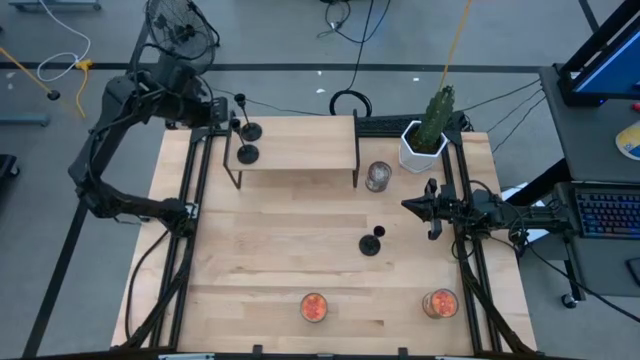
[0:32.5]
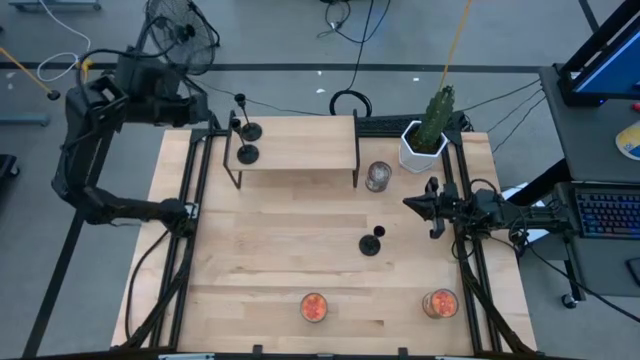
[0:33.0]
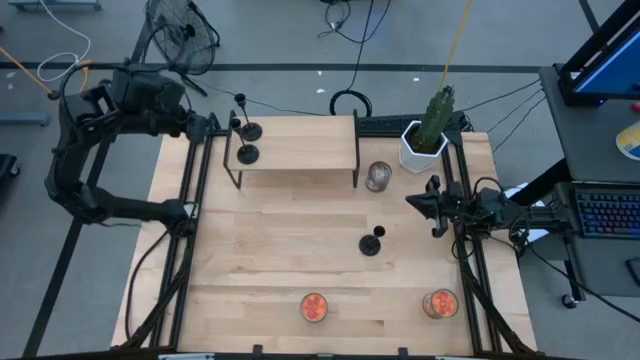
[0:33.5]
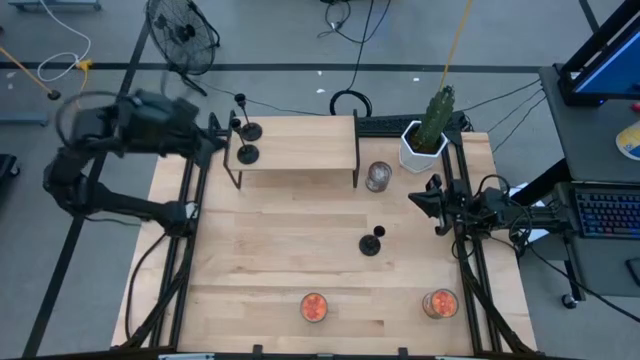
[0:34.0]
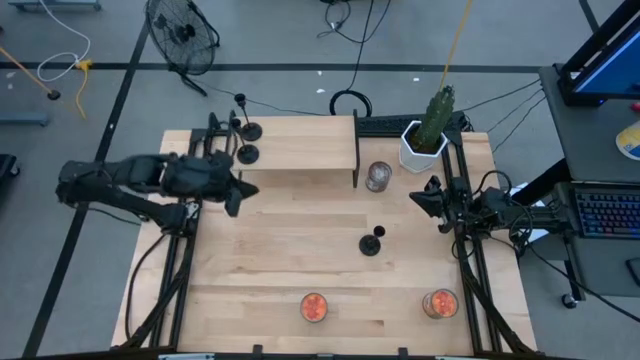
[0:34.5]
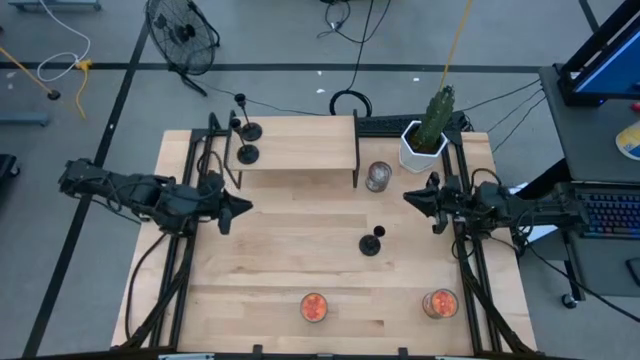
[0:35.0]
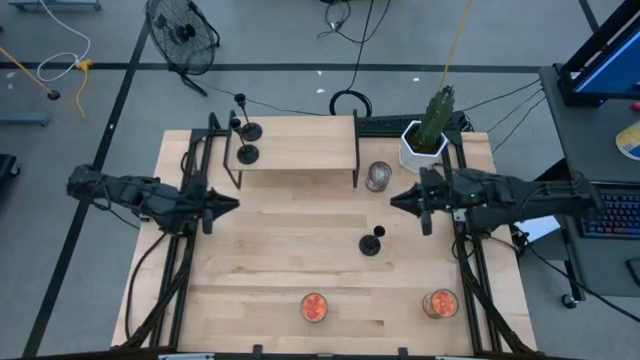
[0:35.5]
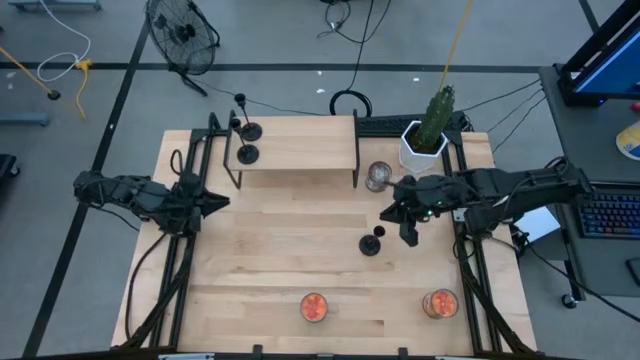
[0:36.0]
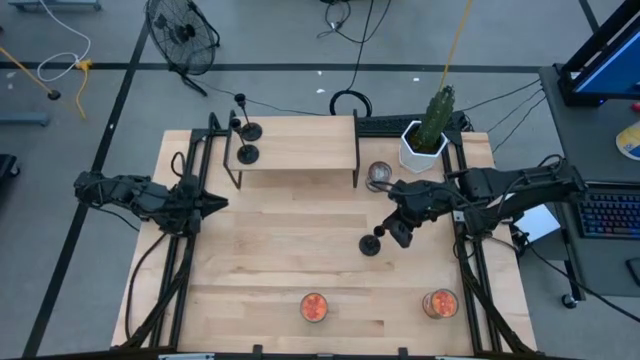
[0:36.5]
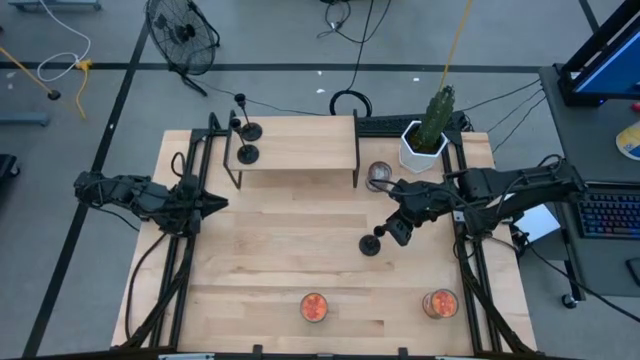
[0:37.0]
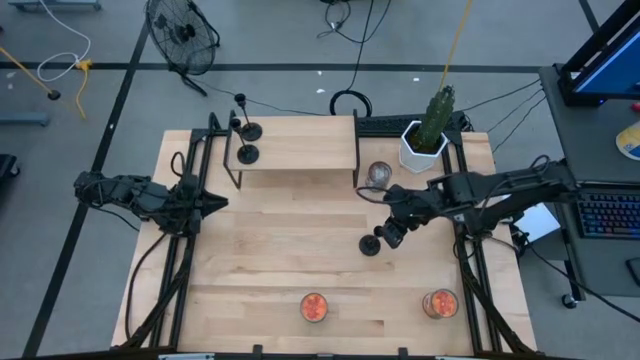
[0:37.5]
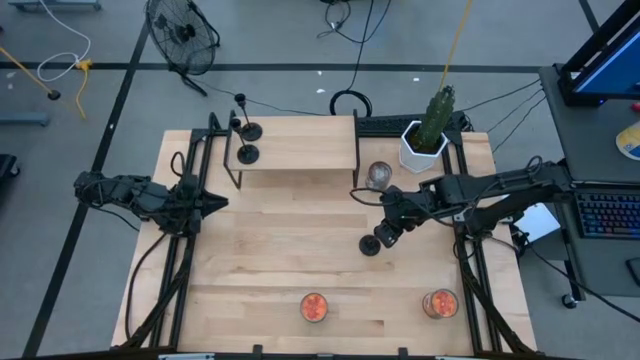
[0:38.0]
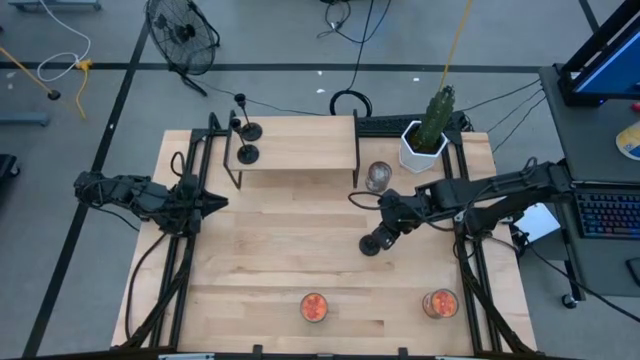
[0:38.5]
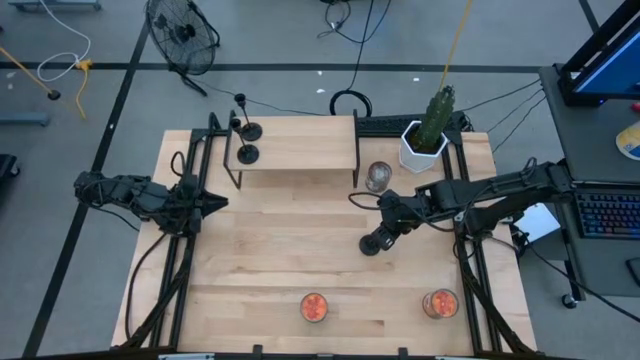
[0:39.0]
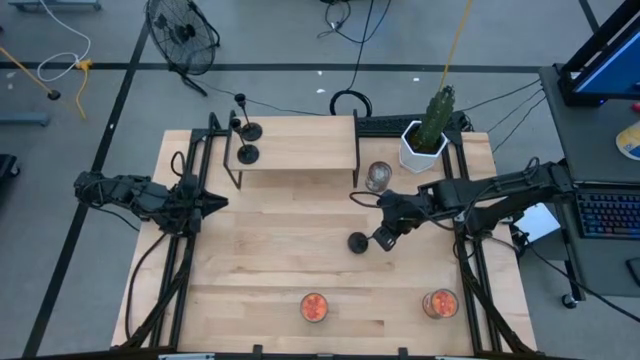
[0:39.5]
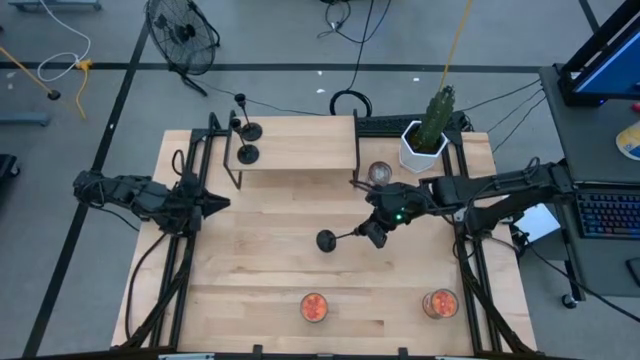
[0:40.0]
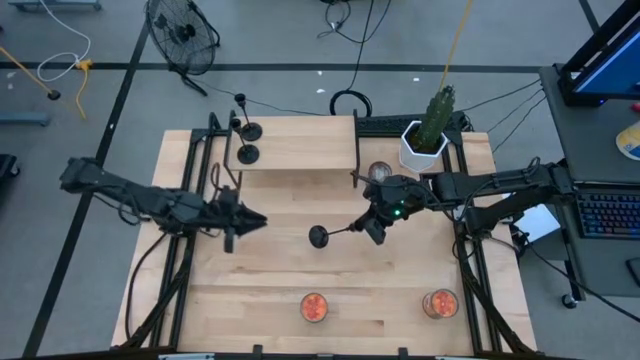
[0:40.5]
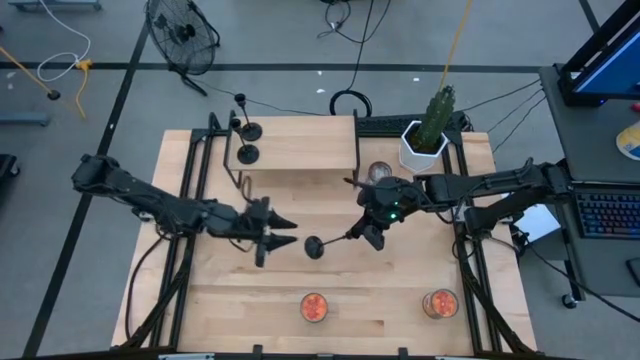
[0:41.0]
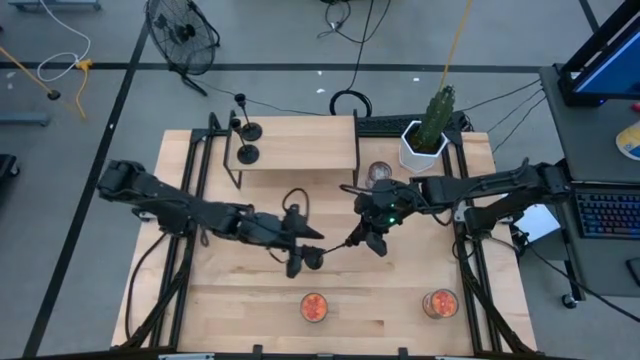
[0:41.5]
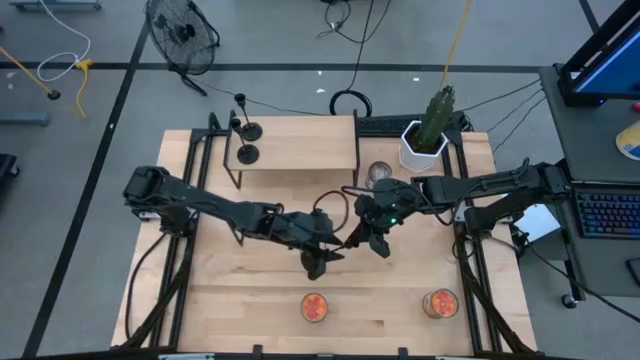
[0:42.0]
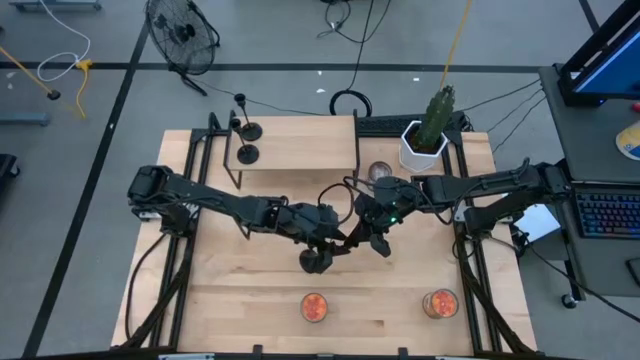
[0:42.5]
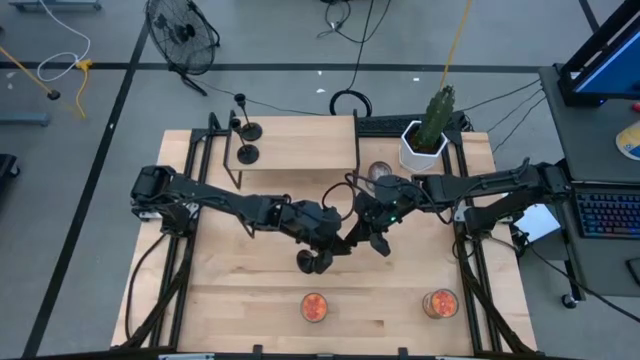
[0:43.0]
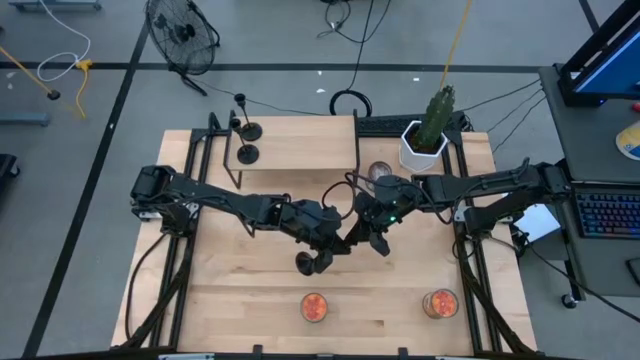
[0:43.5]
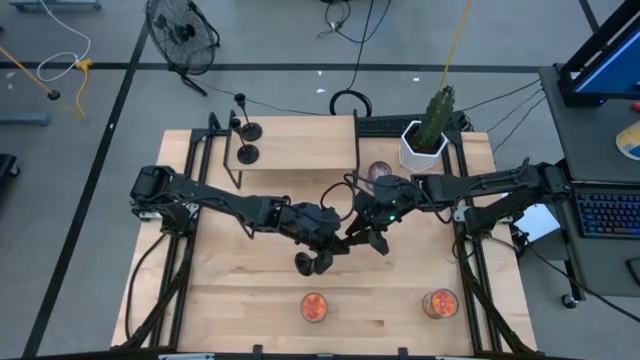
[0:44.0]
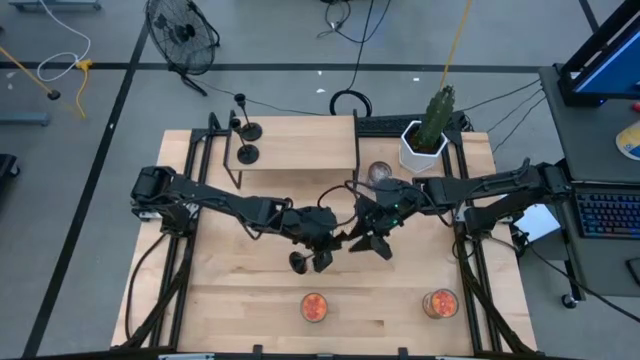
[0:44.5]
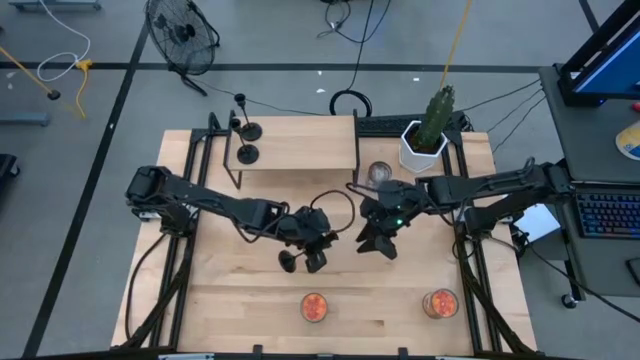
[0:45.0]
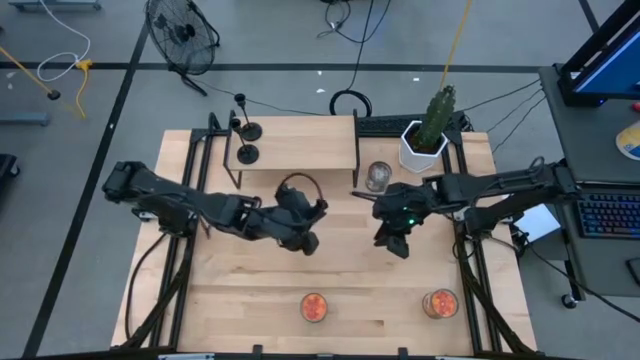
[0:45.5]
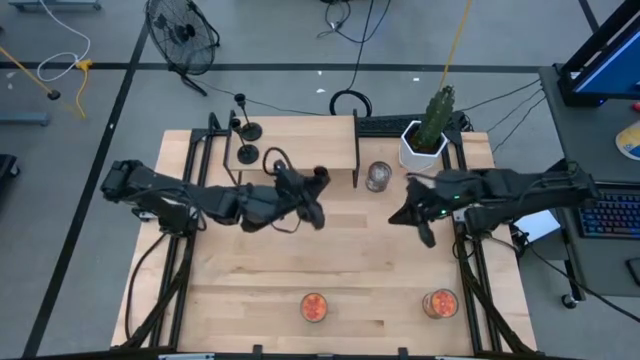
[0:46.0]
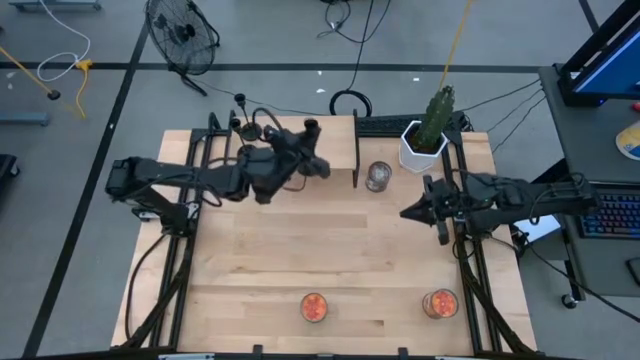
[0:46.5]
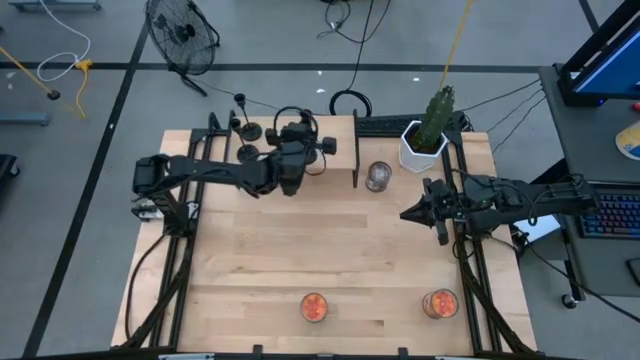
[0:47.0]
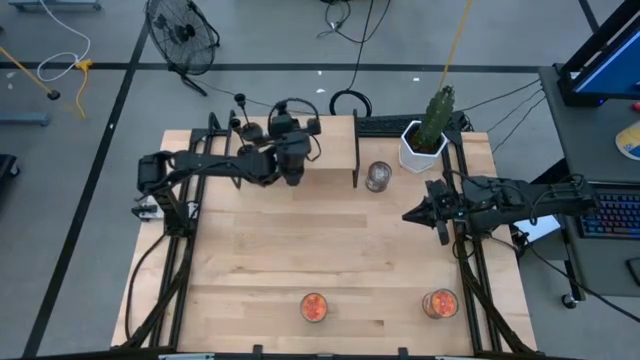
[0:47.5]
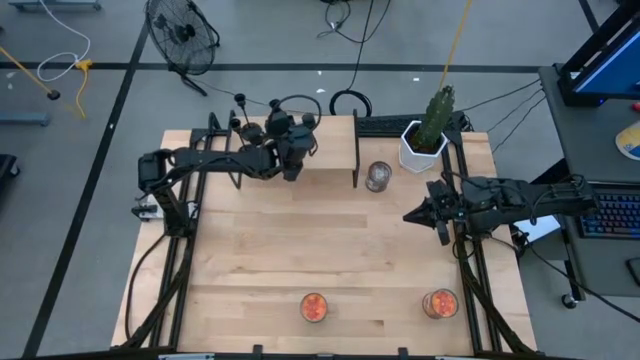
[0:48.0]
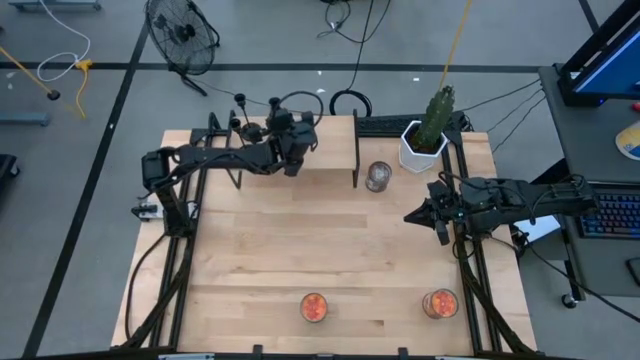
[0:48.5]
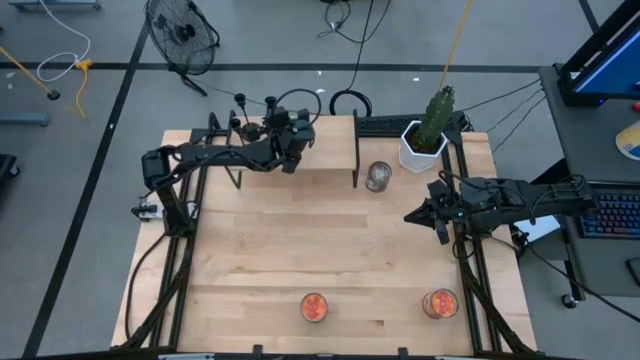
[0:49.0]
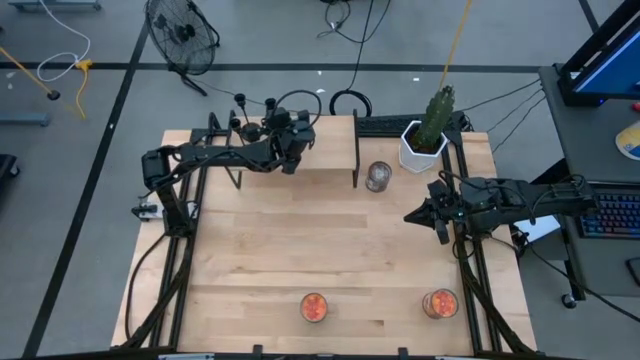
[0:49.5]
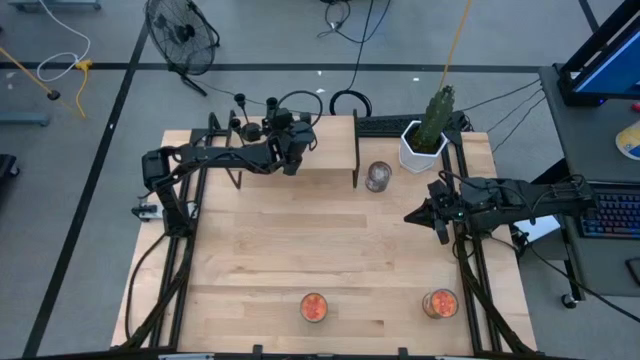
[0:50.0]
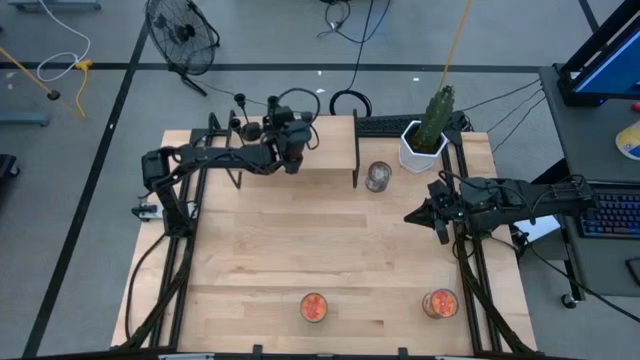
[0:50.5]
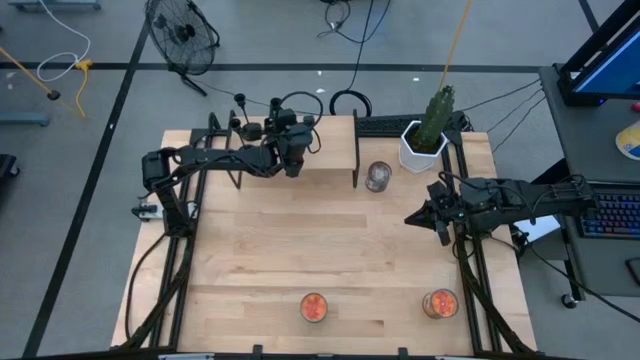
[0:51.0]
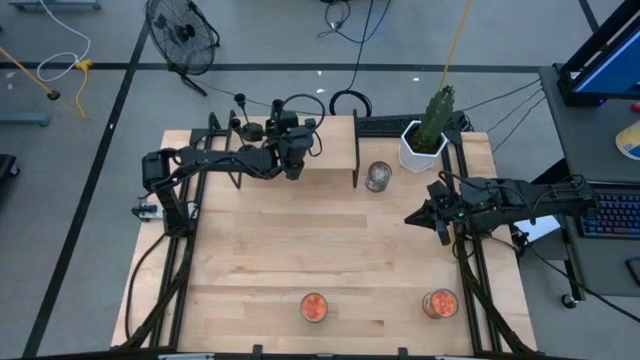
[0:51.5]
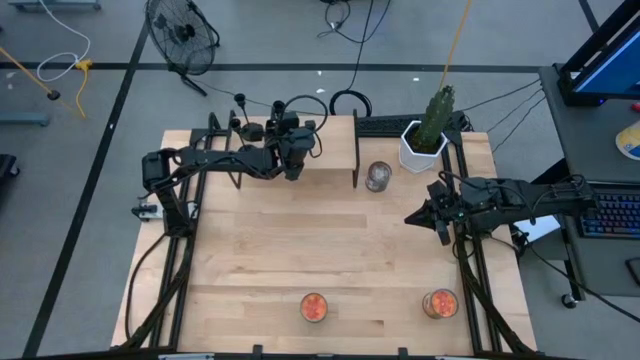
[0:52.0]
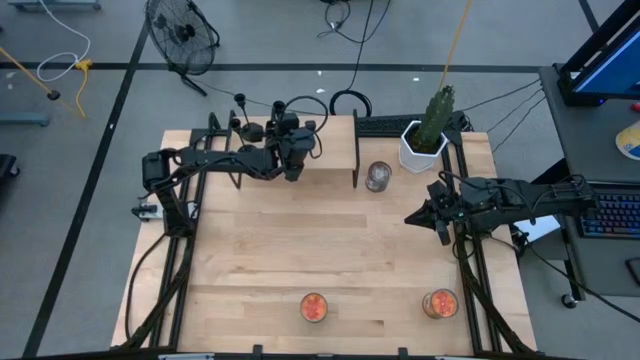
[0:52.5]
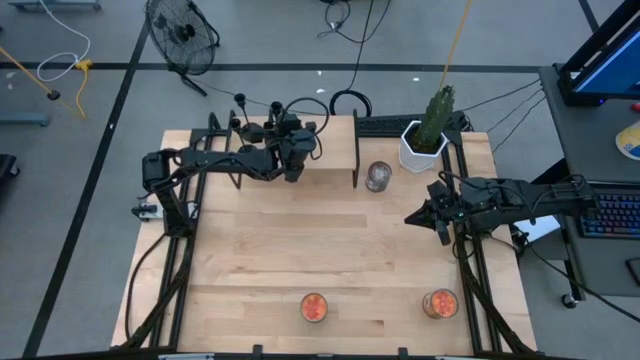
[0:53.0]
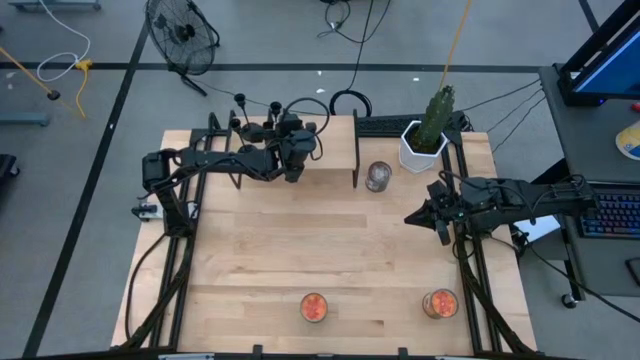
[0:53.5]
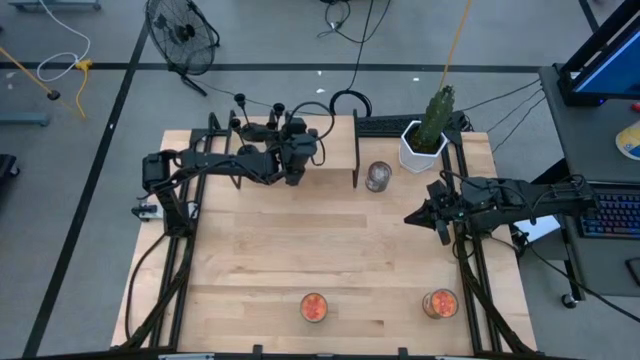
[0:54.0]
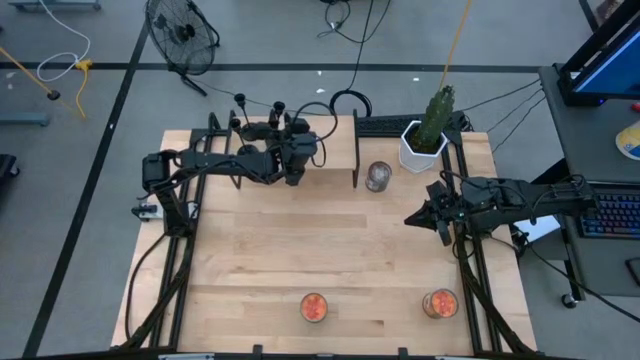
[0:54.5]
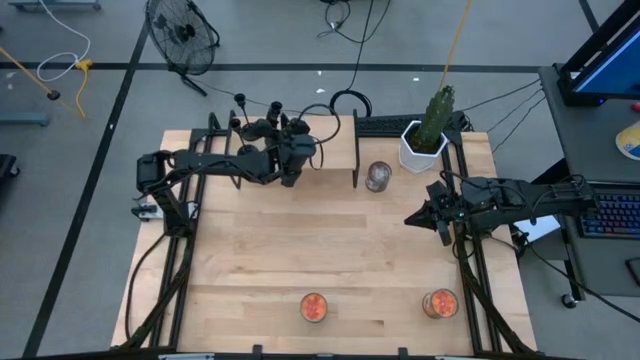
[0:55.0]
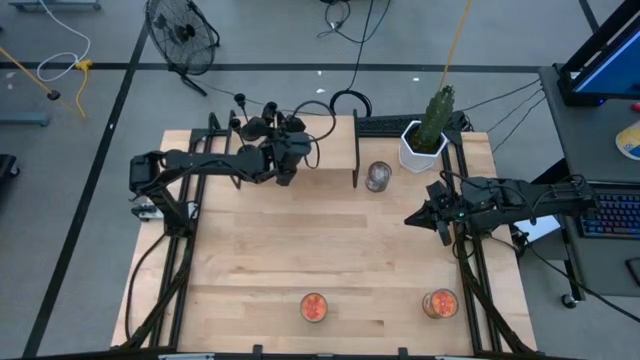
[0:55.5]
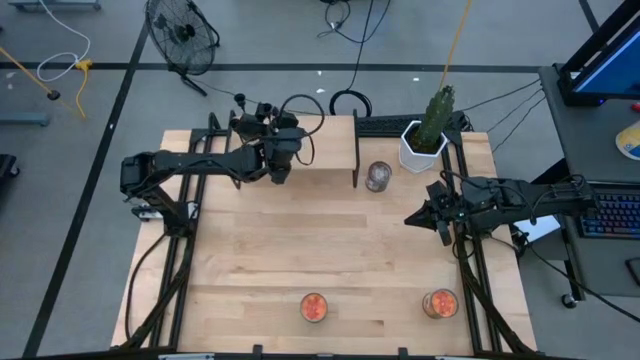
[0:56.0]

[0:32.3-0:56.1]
Task: Pick & Place candle stick holders
Put the black candle holder on the shelf
